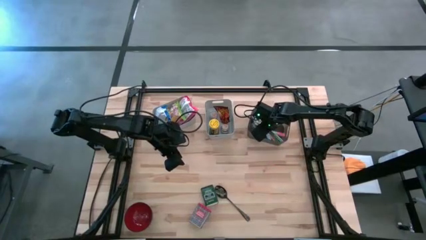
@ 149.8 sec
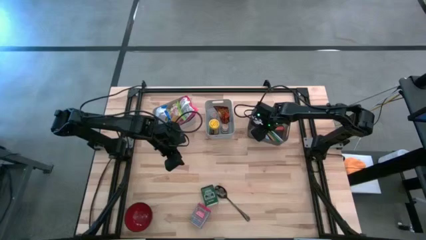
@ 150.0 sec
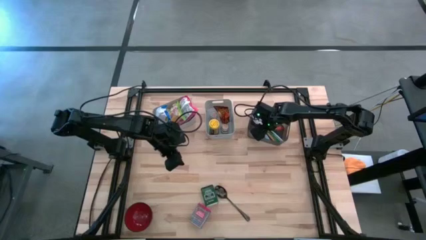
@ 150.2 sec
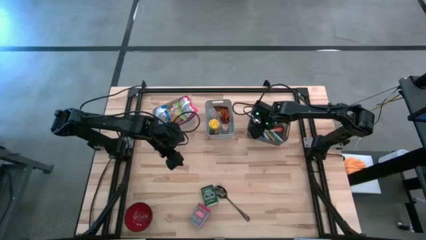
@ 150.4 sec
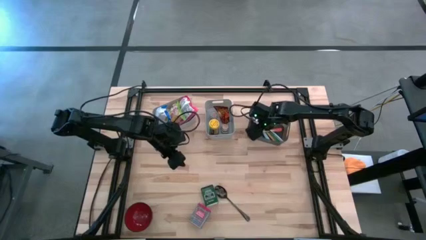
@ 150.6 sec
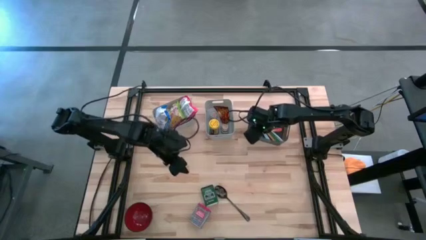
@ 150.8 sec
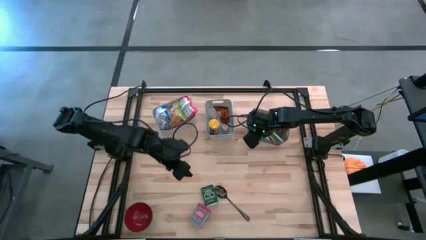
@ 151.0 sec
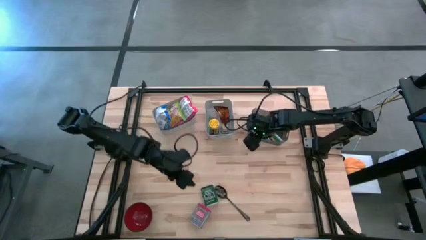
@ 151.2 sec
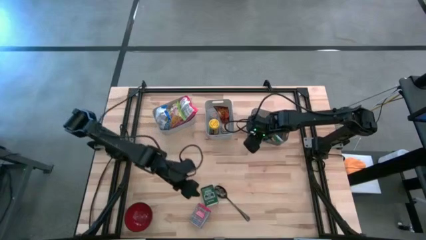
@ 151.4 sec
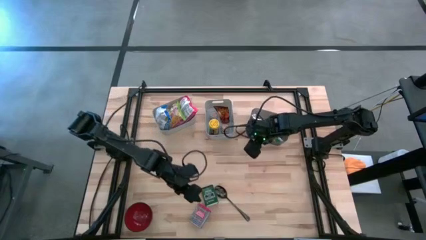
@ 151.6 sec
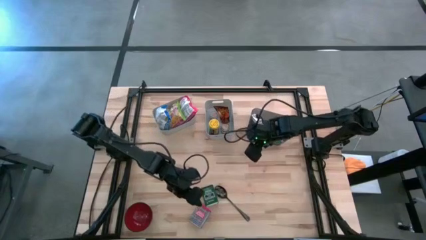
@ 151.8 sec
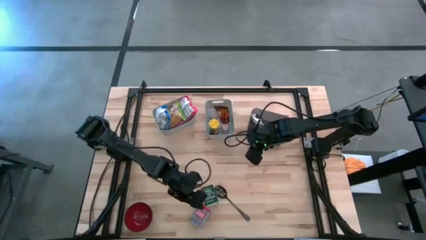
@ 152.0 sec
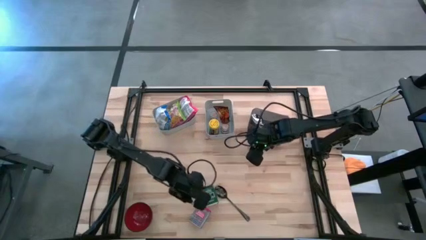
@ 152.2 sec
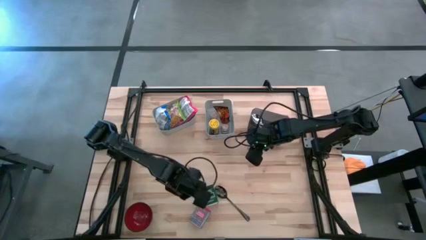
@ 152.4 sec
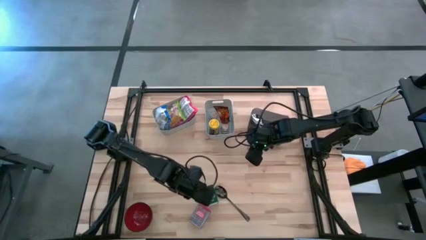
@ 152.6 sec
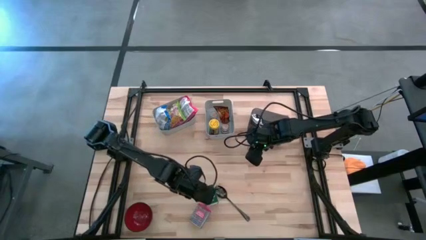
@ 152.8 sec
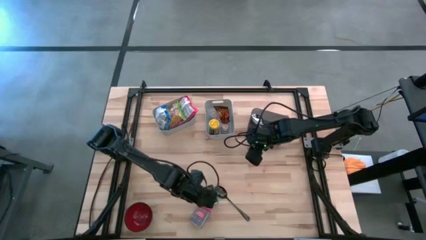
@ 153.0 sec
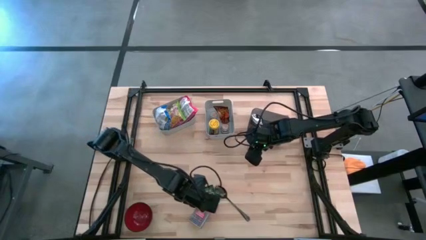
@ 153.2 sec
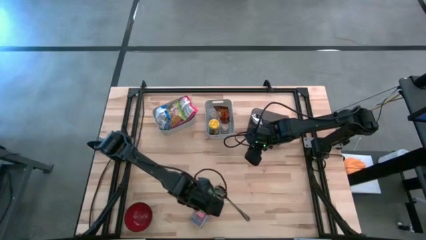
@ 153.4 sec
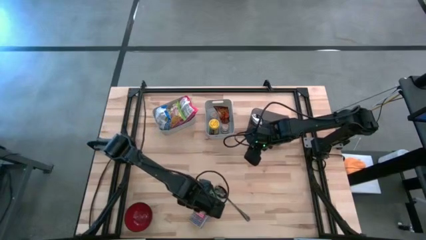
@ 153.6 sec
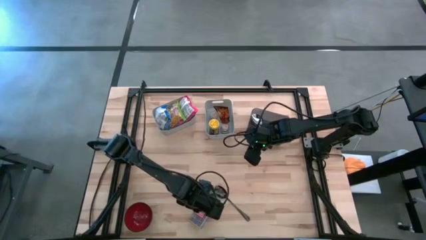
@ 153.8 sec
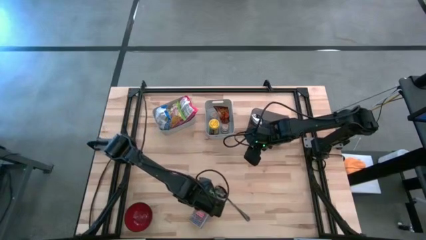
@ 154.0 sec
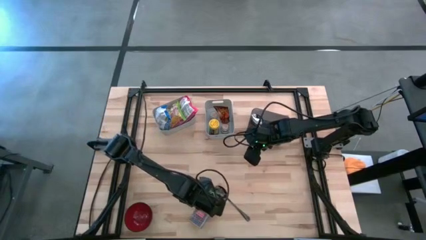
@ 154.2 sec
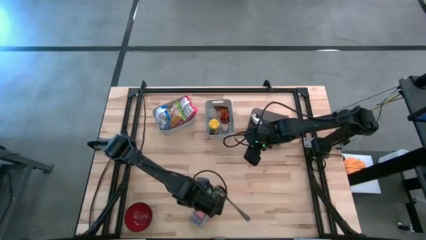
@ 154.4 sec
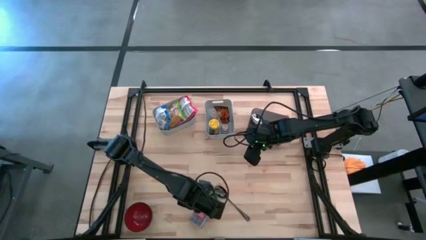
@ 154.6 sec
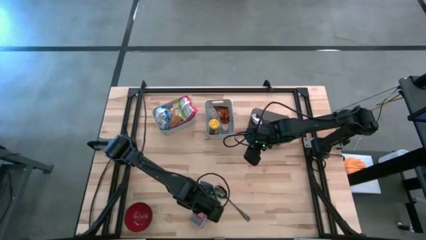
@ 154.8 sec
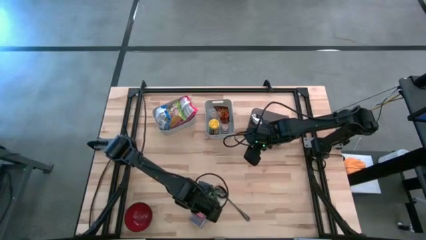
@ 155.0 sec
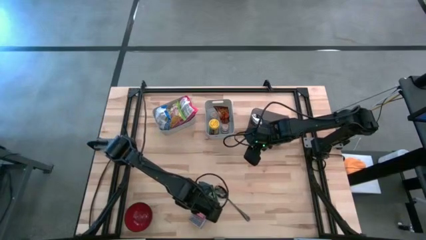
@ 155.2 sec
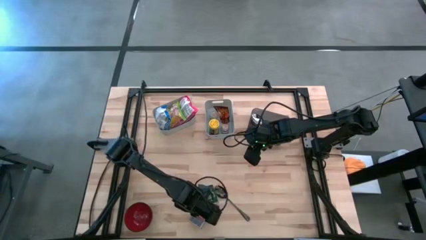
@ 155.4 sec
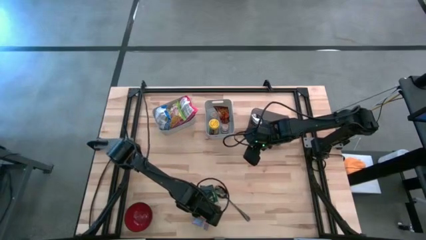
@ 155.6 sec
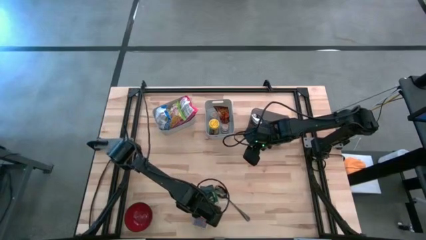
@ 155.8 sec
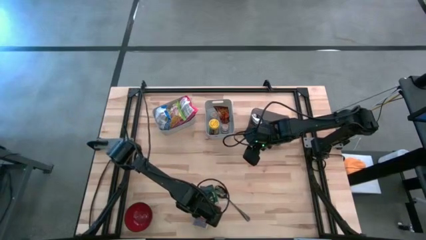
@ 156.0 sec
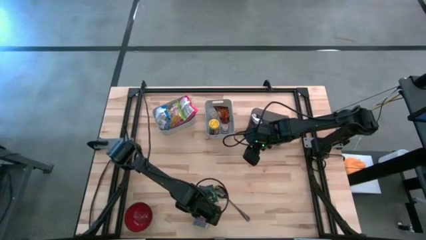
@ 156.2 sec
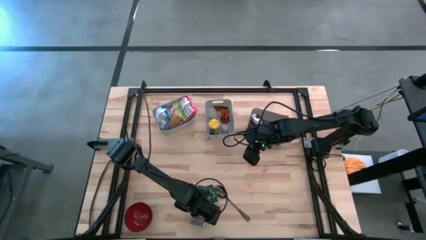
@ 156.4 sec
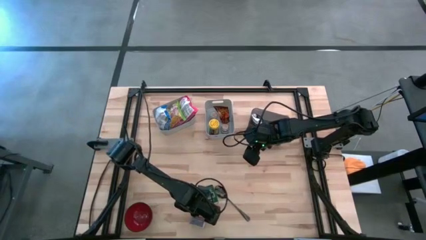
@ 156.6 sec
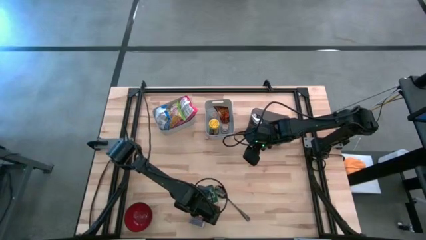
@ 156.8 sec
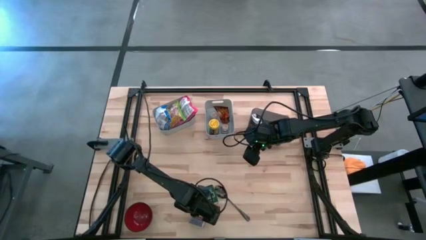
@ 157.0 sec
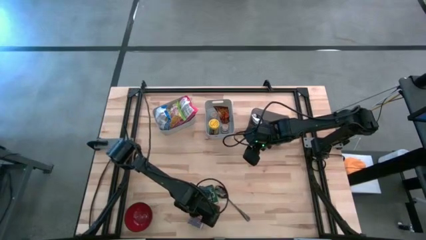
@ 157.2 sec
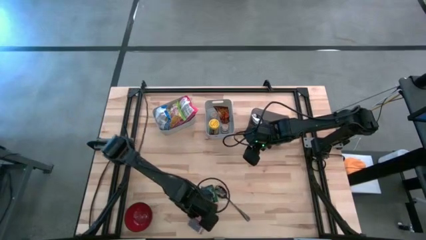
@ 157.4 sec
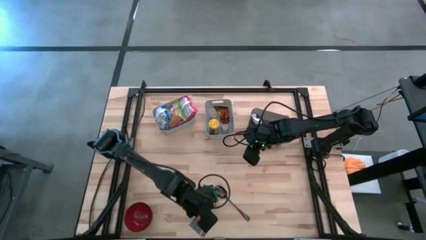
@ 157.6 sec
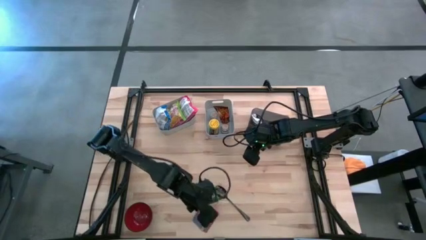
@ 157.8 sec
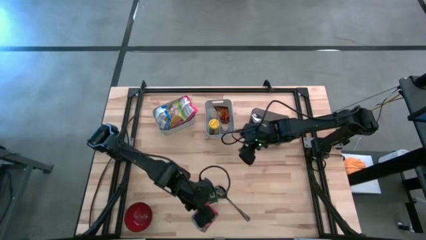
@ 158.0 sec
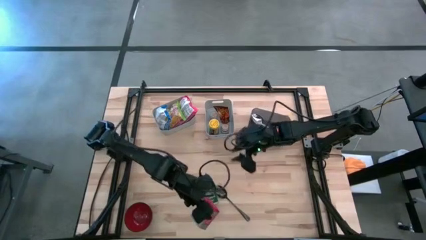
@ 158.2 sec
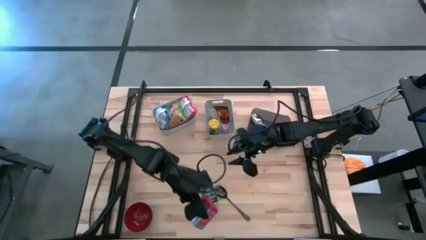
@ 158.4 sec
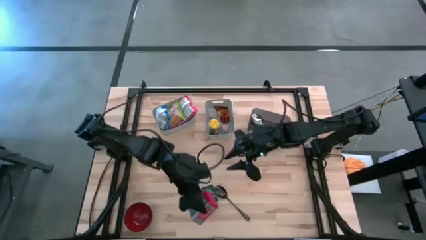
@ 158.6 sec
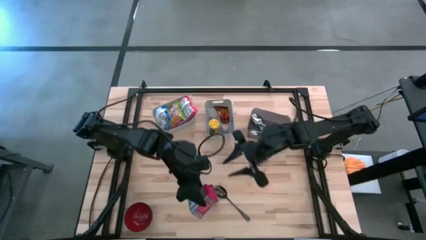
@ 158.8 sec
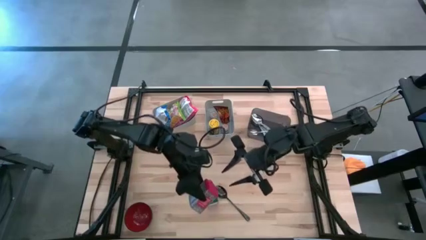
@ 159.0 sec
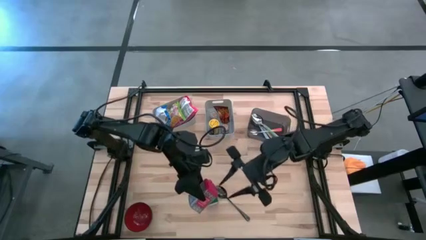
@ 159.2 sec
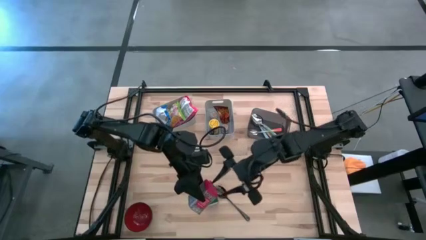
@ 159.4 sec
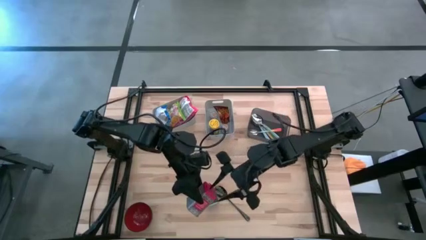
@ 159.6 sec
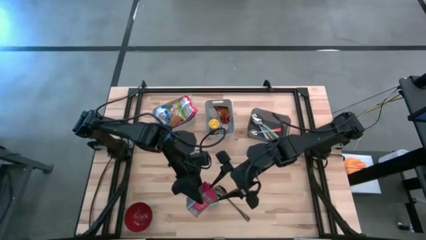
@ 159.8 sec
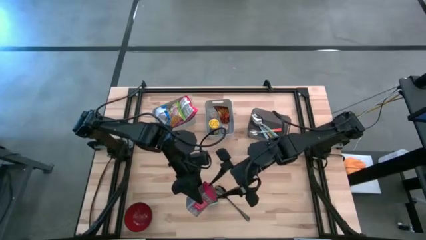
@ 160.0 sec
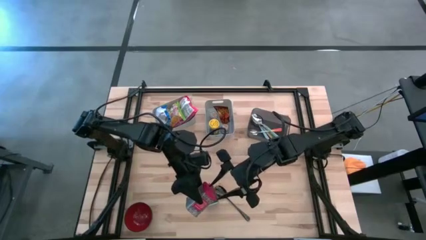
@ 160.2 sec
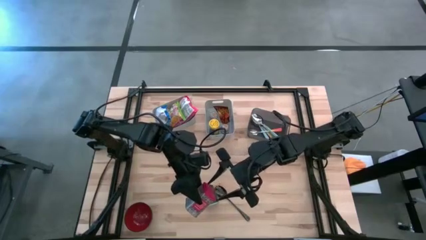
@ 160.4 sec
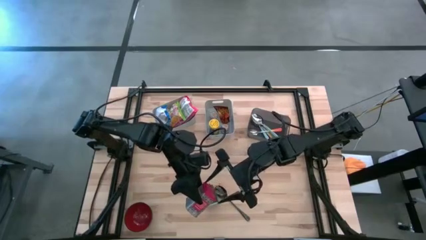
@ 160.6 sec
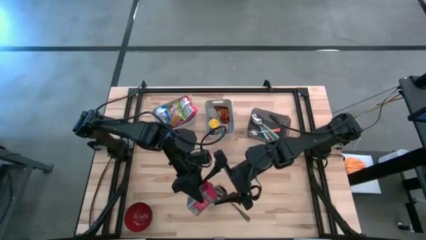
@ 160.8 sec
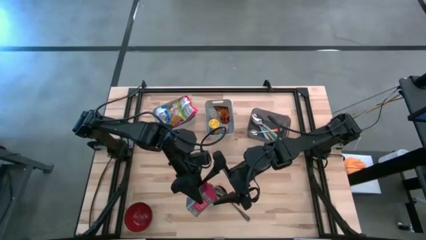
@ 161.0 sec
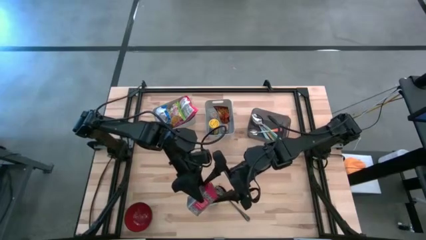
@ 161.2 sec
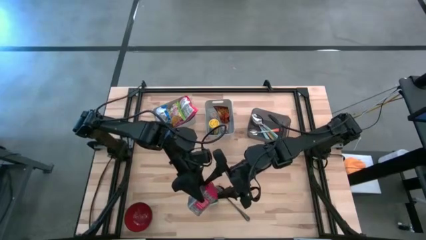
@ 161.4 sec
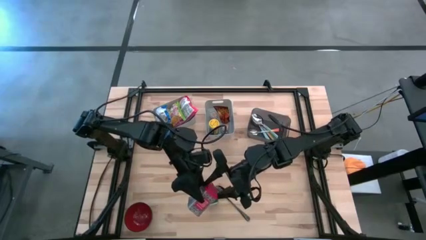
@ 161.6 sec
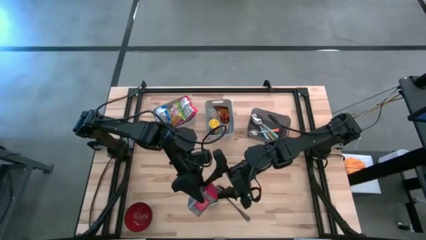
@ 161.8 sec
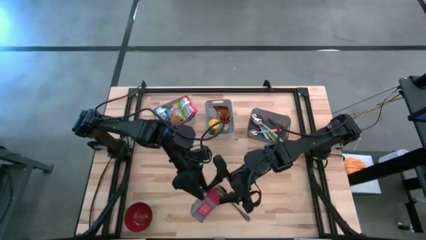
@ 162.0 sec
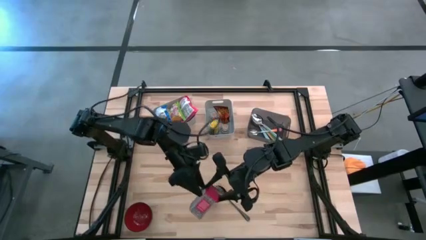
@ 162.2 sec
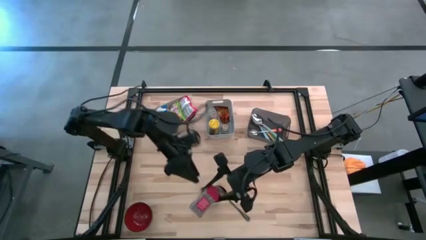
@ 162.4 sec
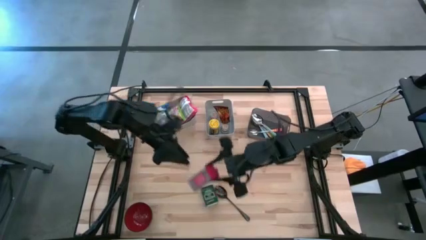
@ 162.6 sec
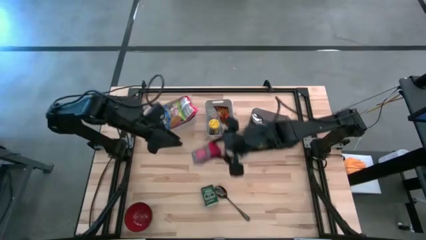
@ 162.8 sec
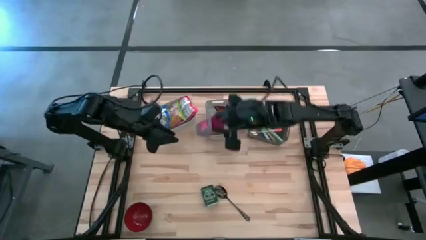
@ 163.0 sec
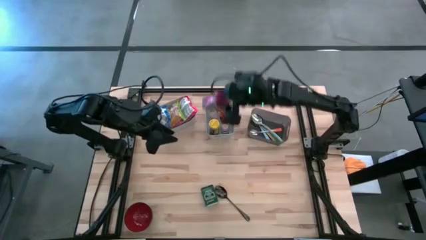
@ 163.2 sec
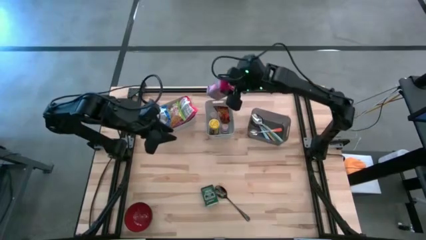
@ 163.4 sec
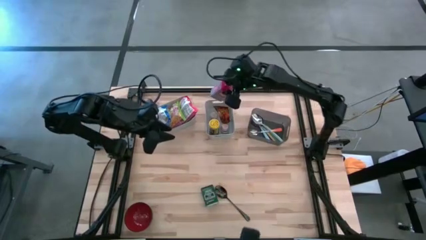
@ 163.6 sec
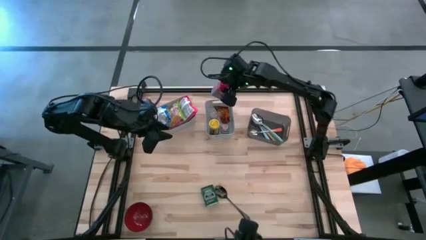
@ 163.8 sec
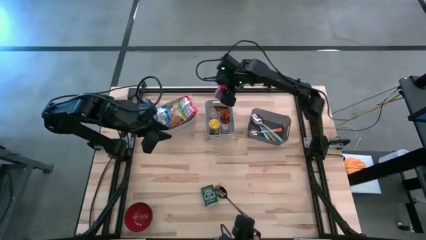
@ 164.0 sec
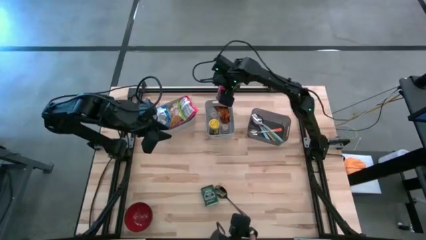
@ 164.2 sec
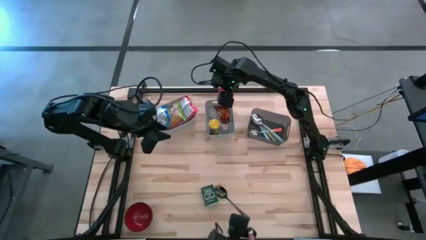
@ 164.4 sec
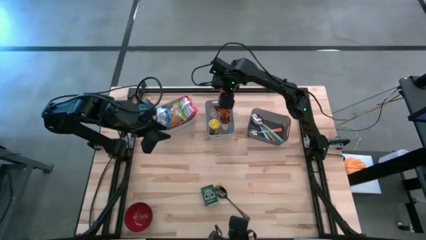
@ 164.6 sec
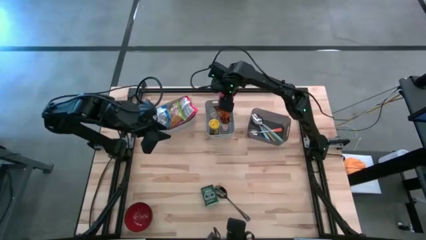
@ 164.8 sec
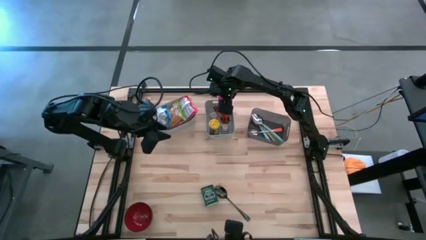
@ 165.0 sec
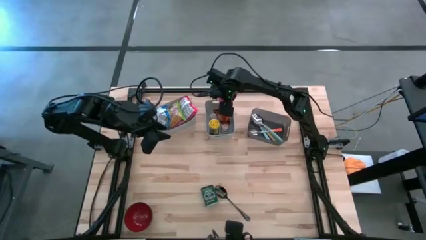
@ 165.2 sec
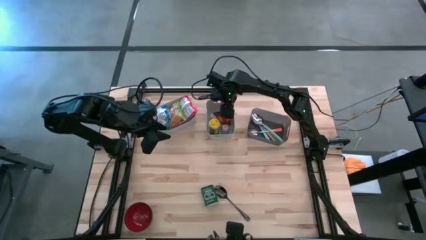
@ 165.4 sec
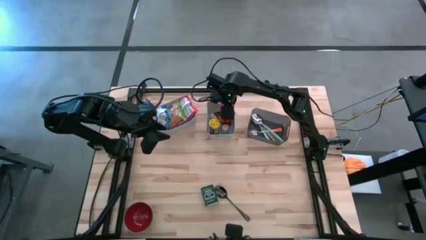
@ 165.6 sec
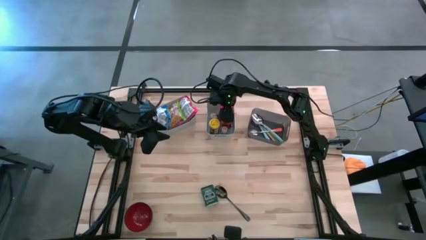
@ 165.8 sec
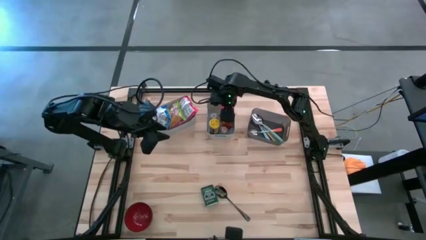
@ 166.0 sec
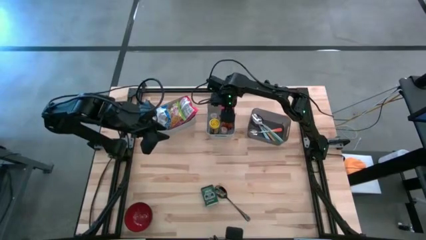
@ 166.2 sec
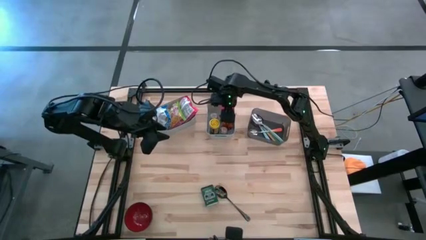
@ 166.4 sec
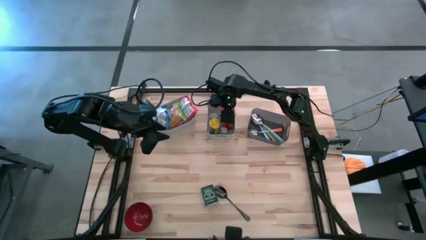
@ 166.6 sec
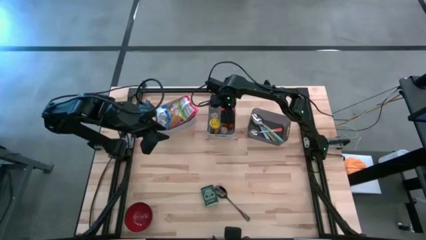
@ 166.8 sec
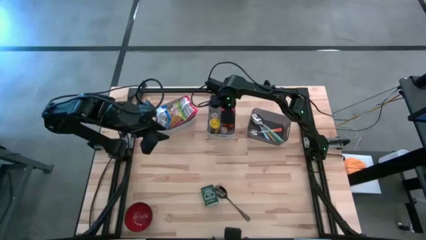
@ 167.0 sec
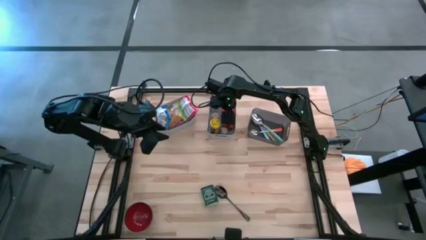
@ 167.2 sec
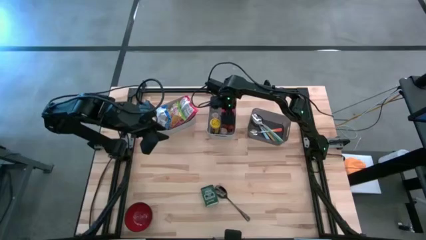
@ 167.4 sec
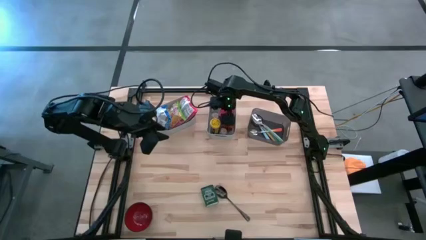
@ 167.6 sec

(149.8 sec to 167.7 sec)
Put the red seasoning can into the right gray bin
